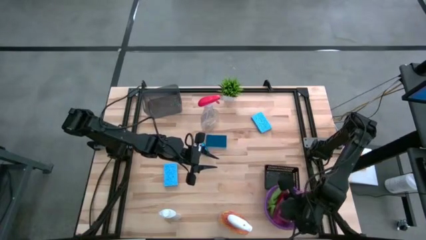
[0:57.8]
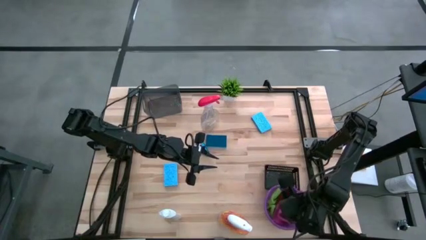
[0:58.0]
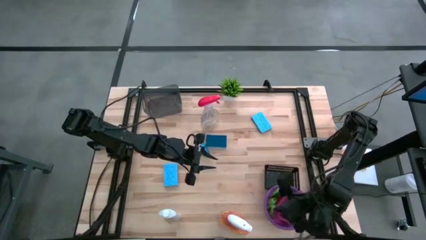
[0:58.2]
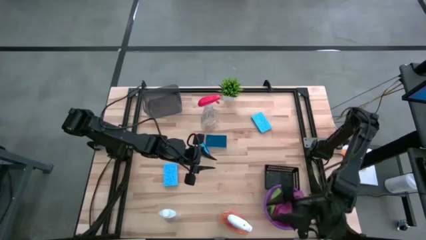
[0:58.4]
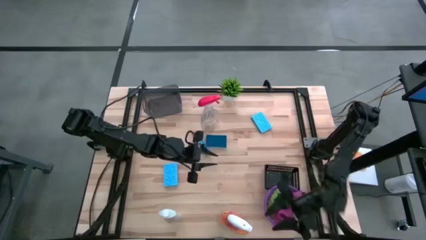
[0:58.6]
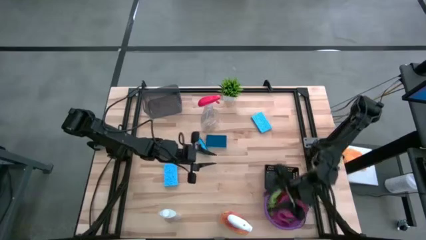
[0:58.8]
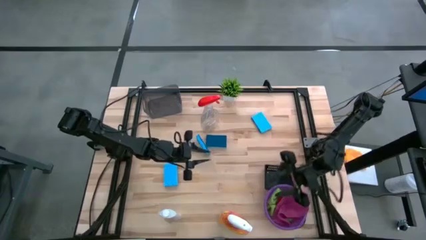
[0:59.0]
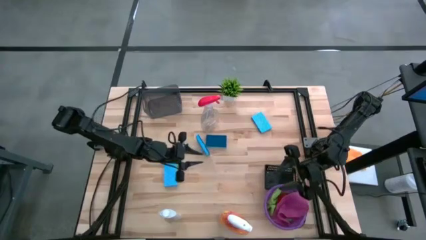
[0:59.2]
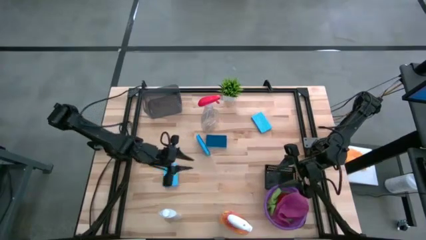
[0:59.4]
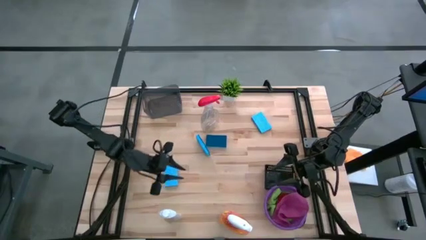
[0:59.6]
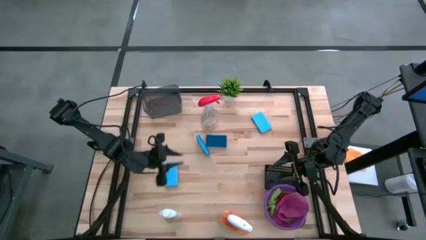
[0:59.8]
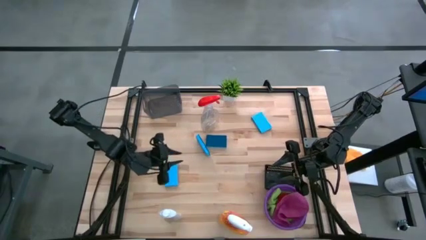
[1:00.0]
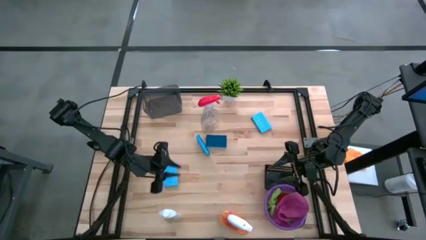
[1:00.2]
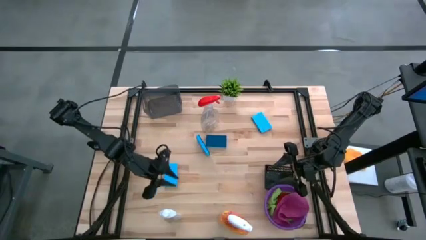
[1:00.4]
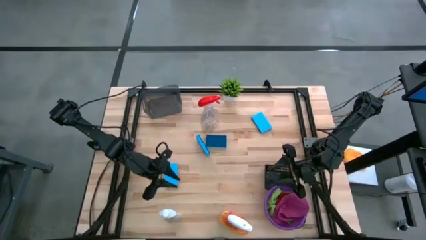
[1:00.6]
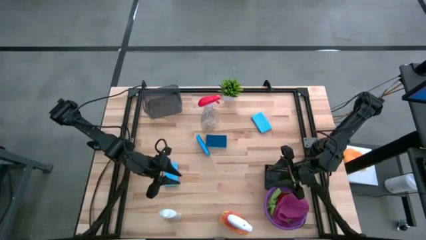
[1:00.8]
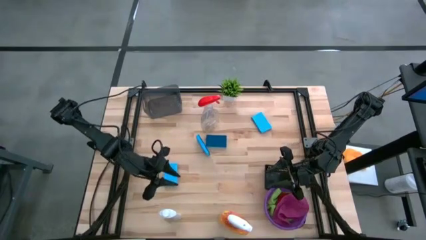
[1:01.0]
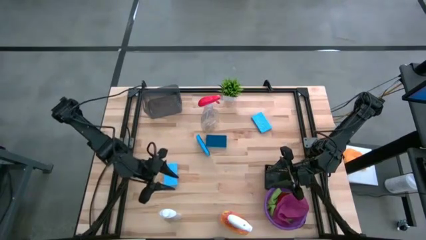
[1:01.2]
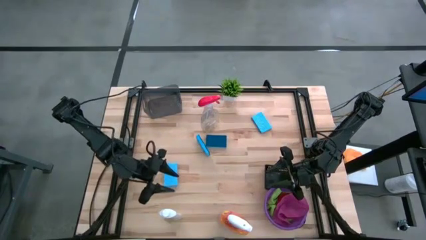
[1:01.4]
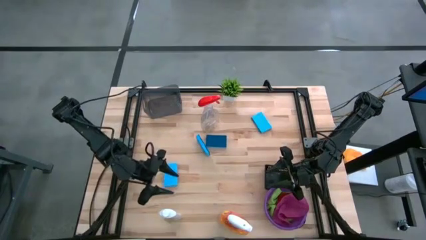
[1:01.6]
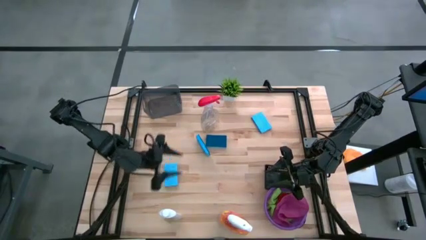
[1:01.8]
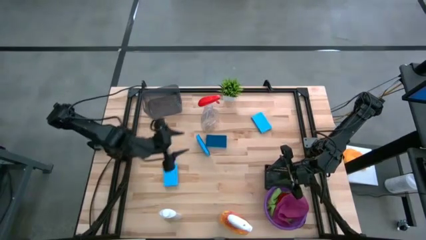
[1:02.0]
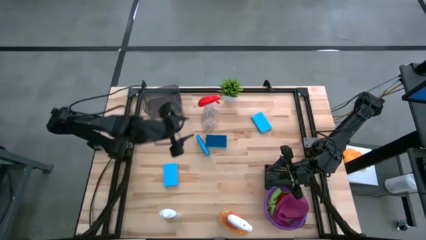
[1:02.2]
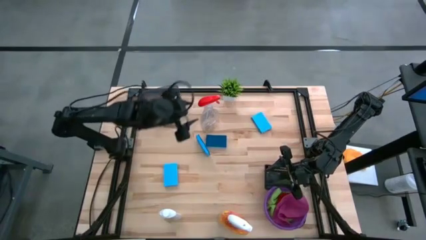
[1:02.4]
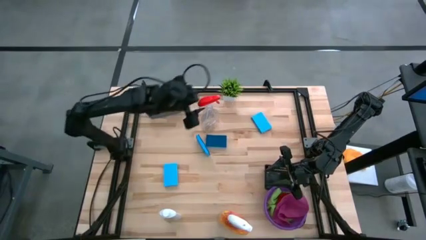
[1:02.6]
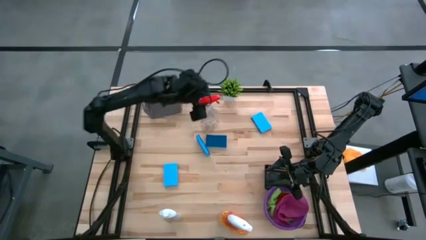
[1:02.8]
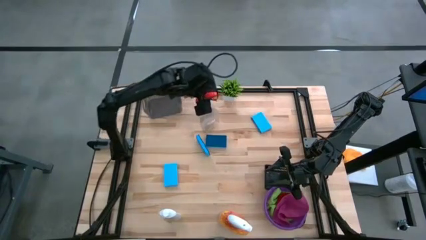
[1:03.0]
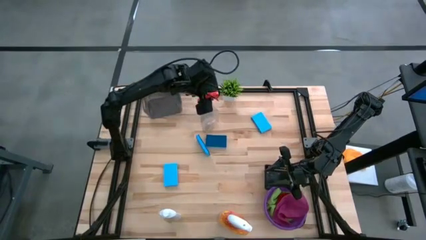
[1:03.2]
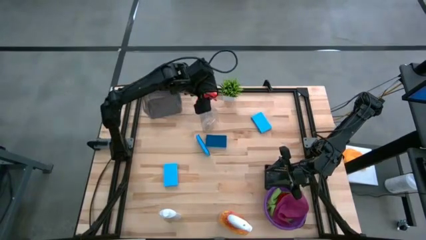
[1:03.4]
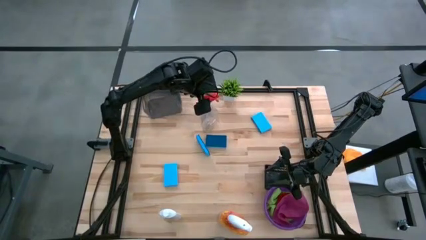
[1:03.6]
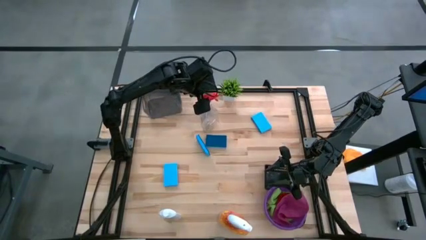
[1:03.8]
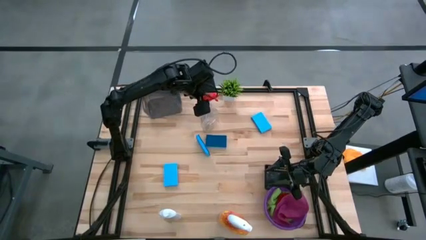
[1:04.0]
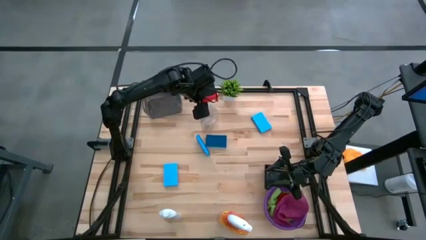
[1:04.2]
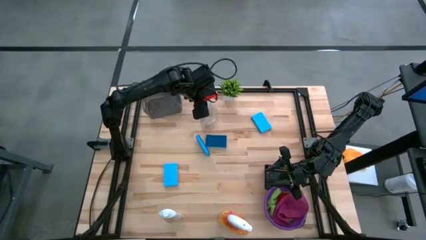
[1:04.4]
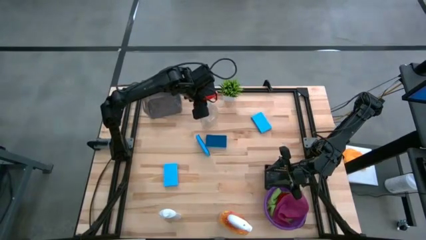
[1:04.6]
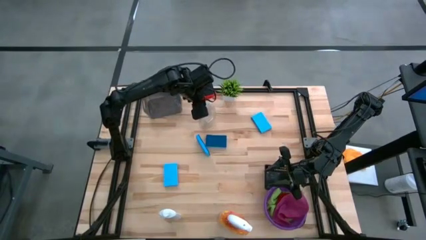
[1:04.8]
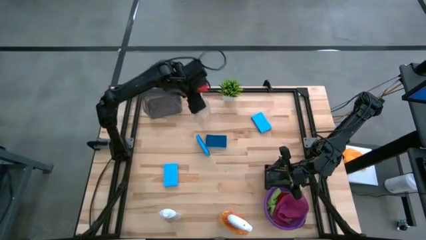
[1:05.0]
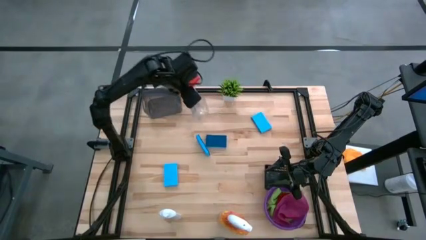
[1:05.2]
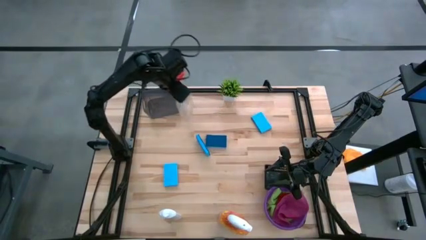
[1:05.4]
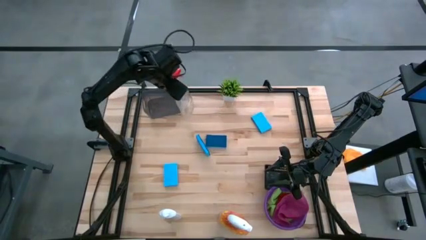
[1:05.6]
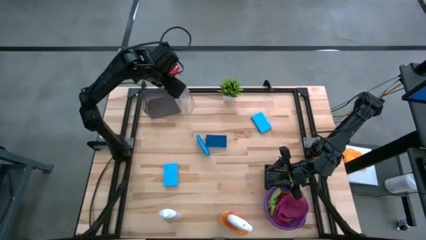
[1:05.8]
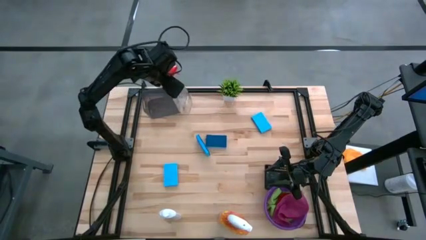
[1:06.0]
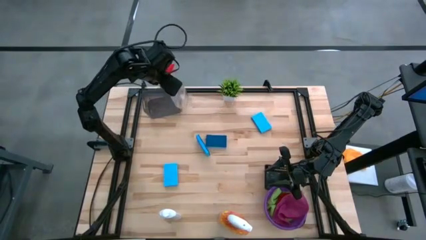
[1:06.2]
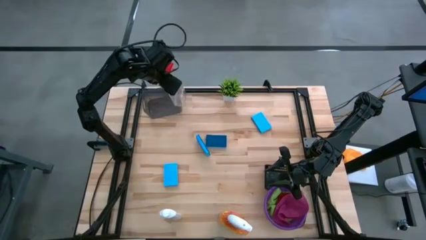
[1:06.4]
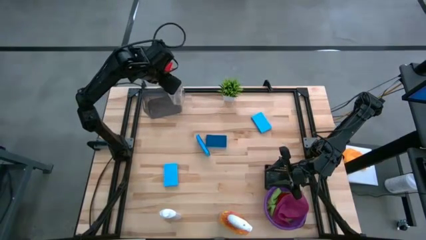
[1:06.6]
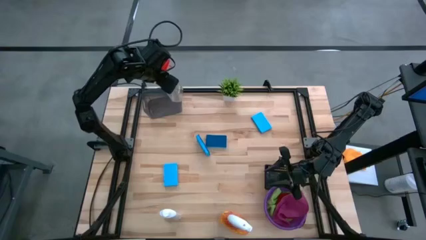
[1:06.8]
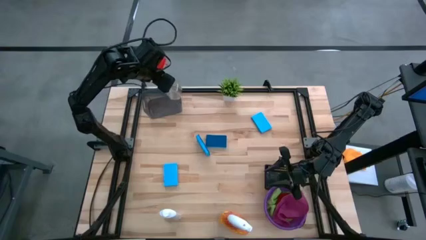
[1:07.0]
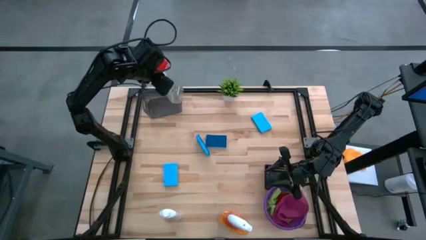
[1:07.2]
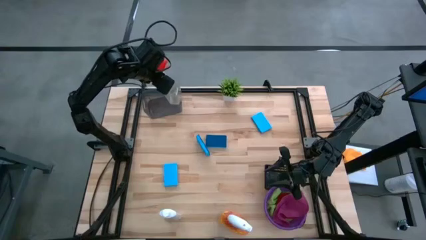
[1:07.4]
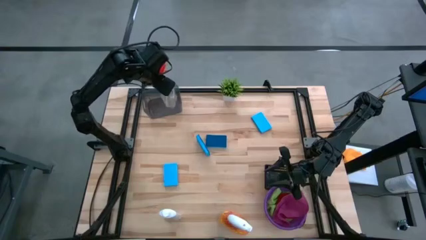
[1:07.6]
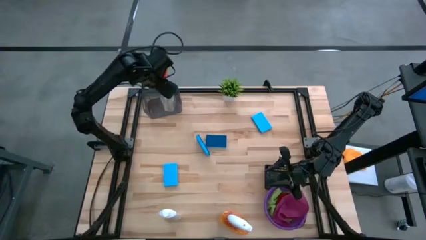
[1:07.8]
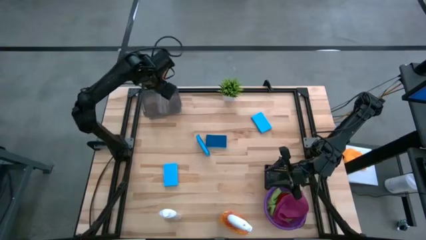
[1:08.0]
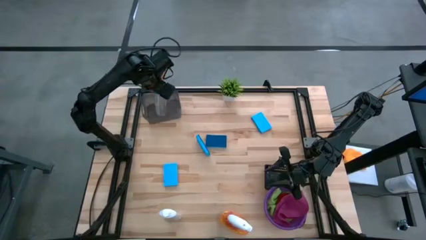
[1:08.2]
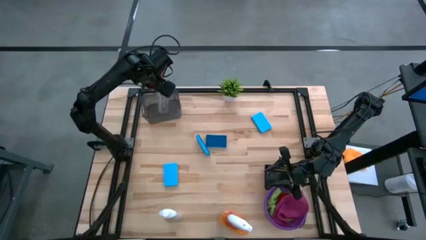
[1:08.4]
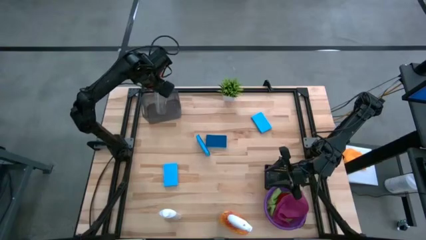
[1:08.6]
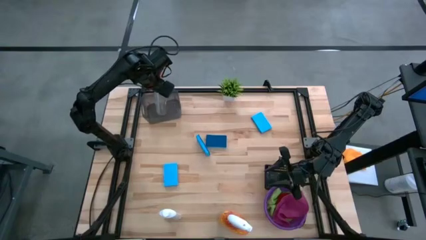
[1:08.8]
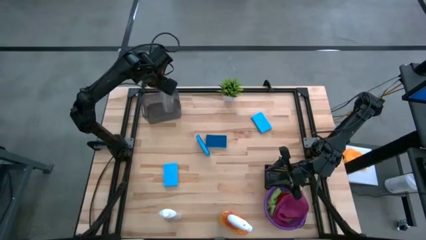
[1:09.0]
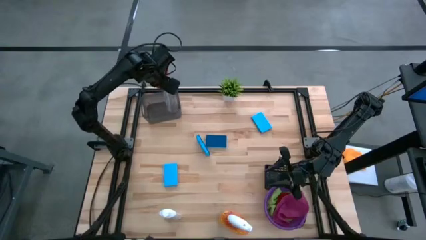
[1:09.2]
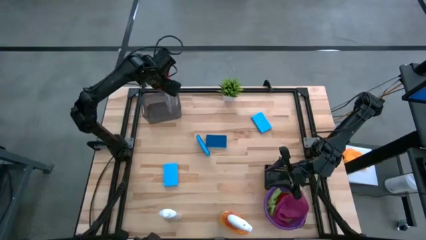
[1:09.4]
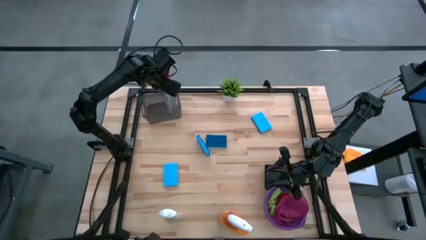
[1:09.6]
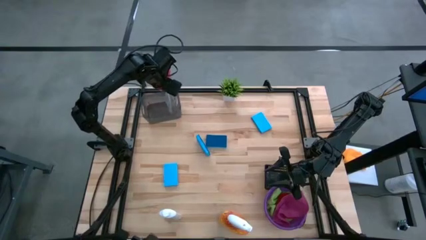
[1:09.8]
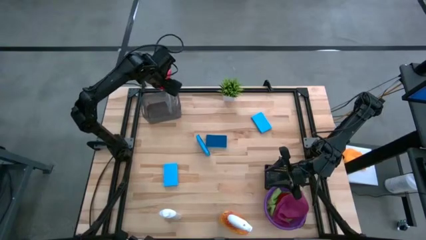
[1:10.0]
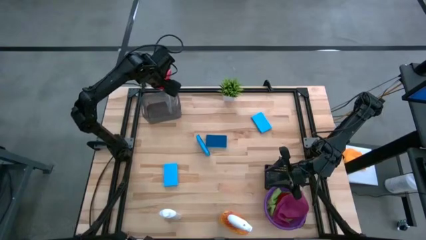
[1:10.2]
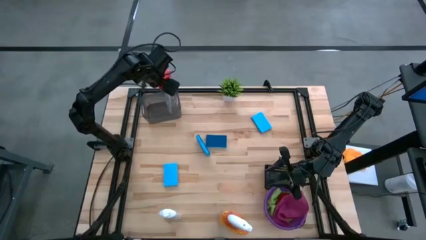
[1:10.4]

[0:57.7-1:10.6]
Task: Pick & Place Kitchen Items
Put the transparent spray bottle into the gray bin

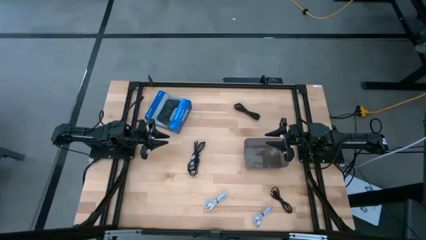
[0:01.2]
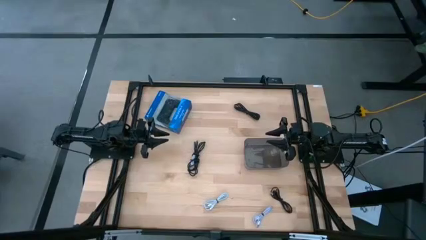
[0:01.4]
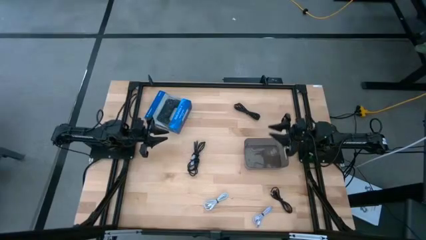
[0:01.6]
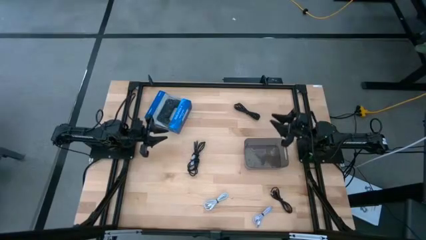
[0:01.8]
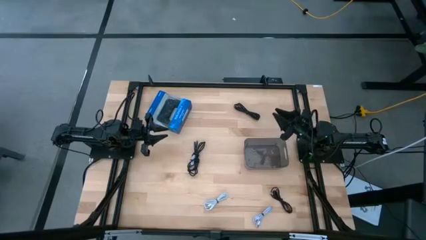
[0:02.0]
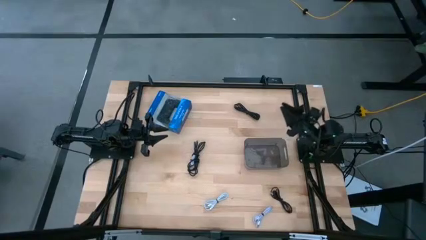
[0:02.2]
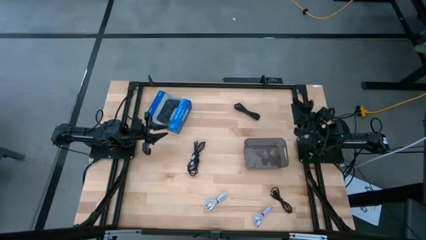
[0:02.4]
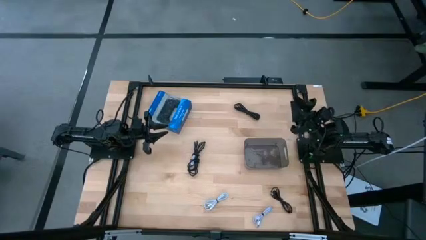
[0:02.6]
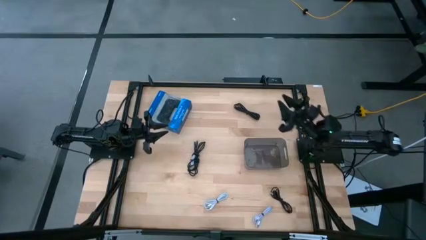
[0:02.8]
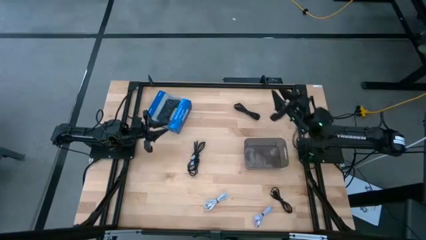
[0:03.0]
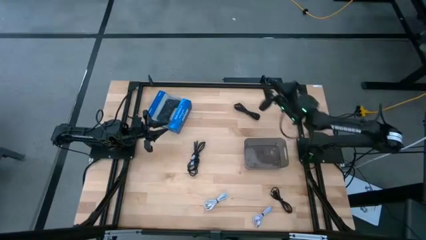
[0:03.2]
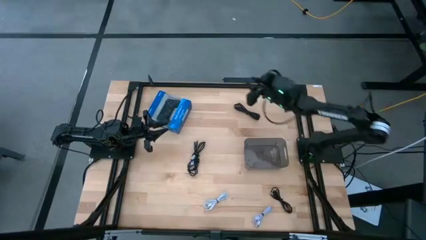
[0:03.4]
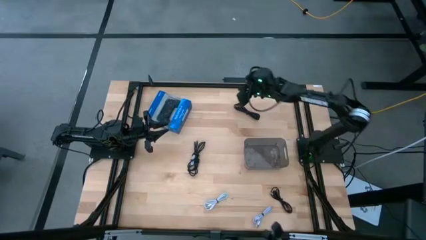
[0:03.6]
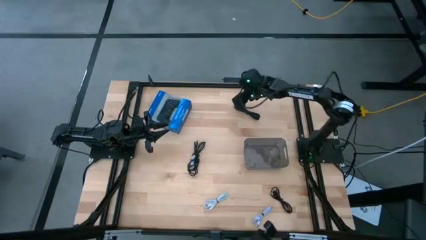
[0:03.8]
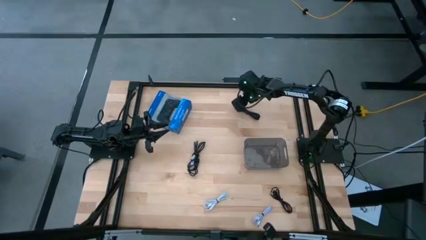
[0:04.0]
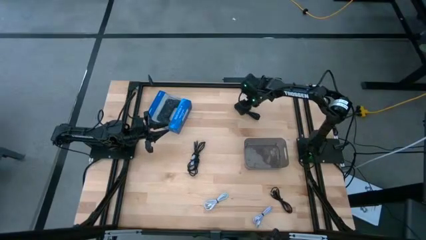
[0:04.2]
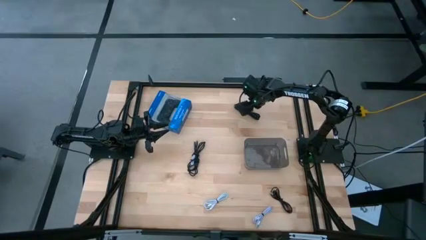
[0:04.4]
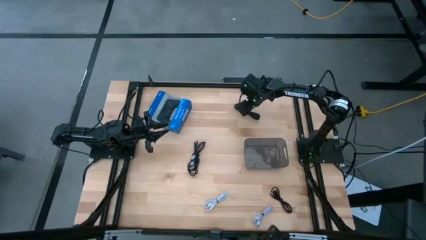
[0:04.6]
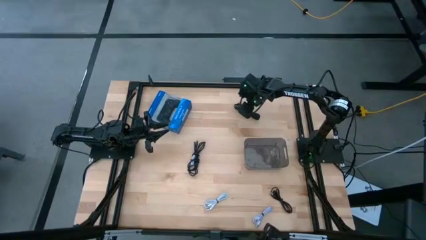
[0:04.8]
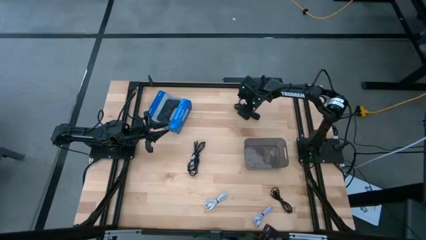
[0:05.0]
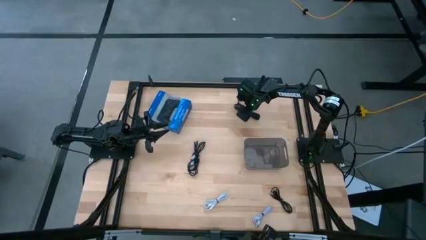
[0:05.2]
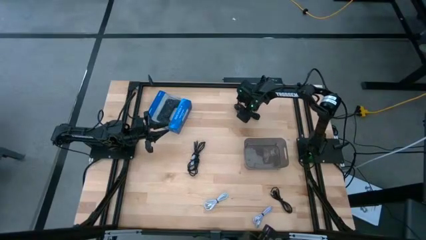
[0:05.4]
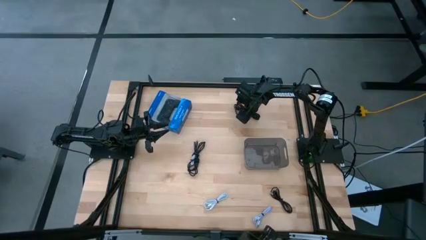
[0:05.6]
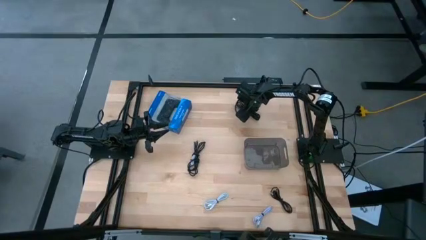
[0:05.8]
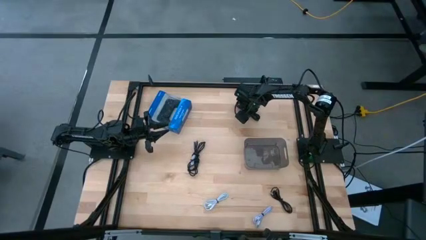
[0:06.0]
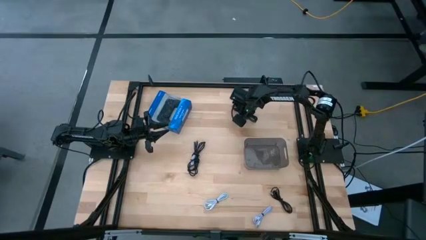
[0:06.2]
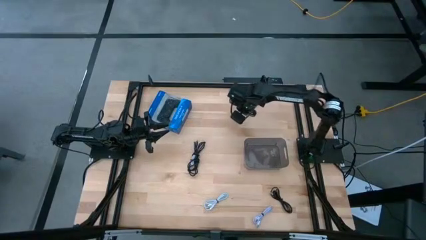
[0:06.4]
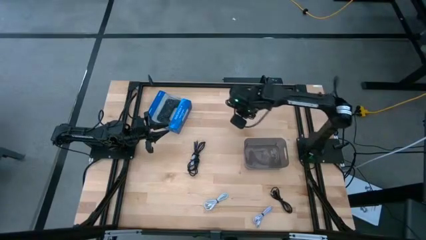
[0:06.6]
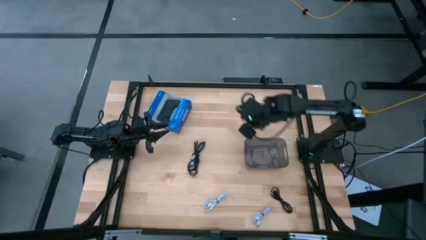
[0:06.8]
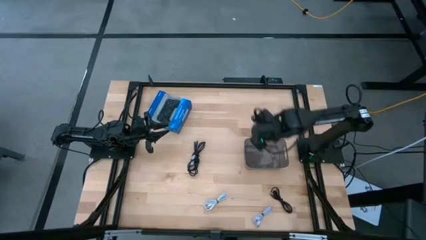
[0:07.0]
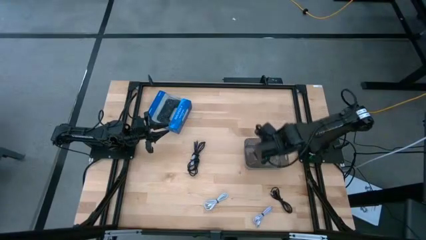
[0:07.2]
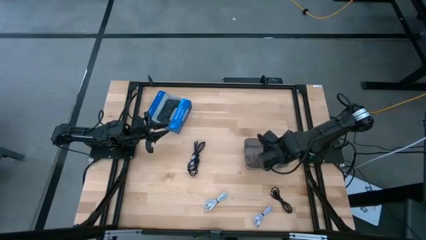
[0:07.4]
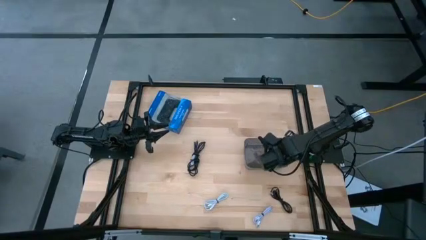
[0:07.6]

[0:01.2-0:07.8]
Task: Pick and place USB-C Cables
Put the top black charger cable into the black bin
